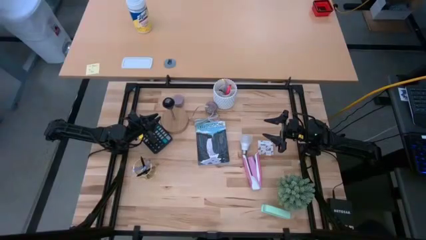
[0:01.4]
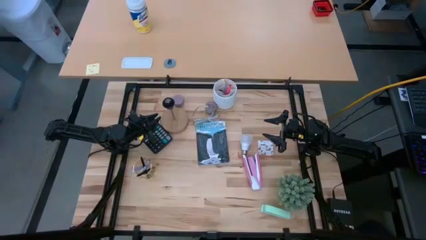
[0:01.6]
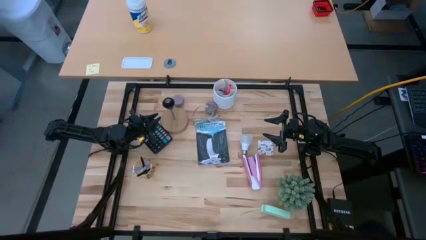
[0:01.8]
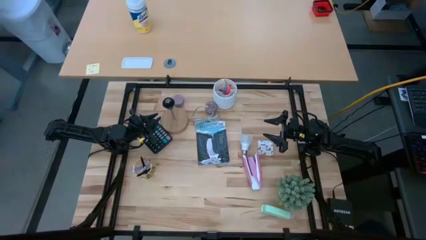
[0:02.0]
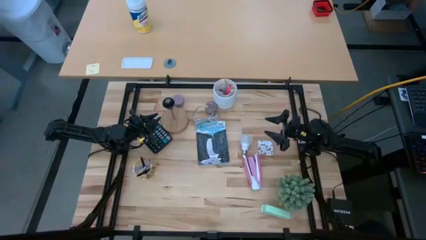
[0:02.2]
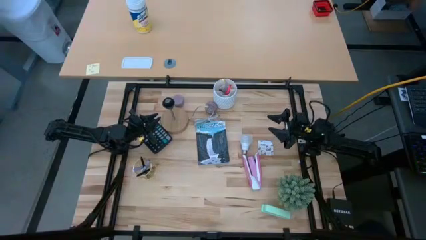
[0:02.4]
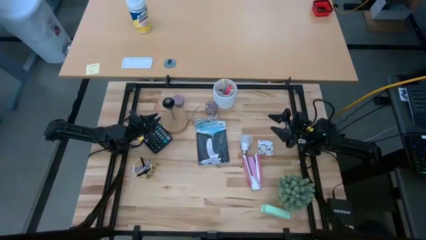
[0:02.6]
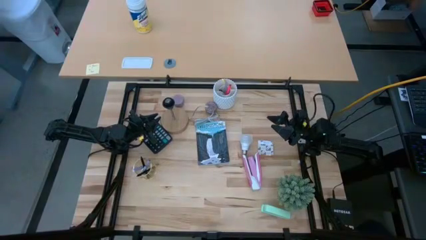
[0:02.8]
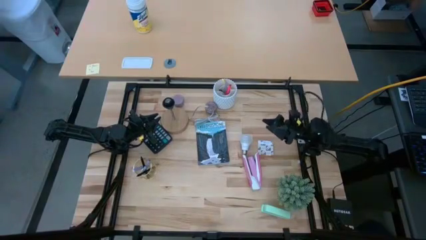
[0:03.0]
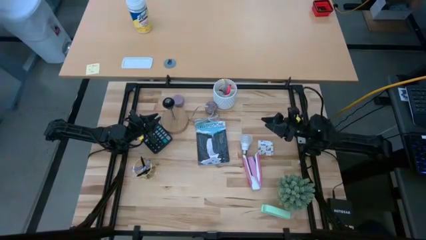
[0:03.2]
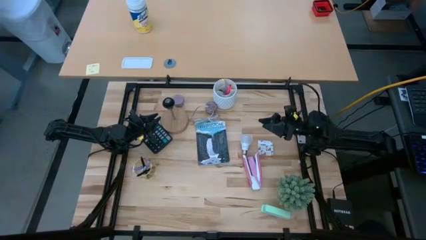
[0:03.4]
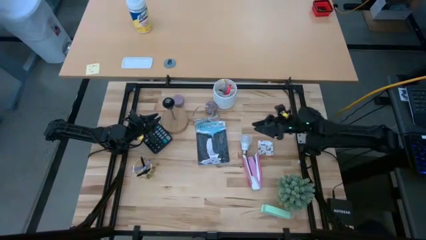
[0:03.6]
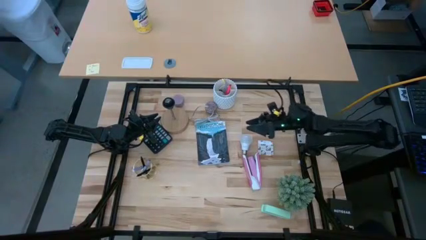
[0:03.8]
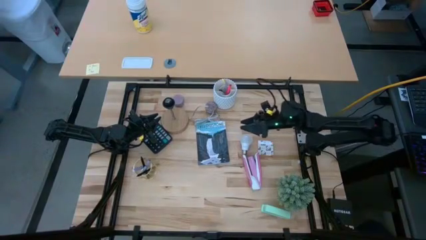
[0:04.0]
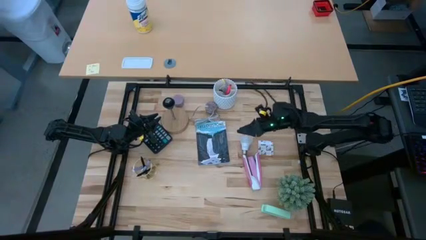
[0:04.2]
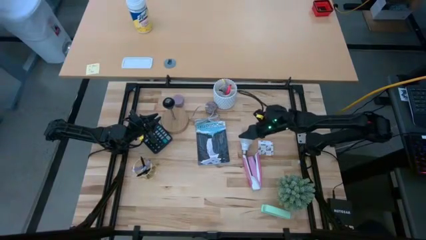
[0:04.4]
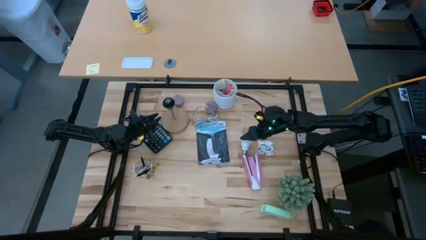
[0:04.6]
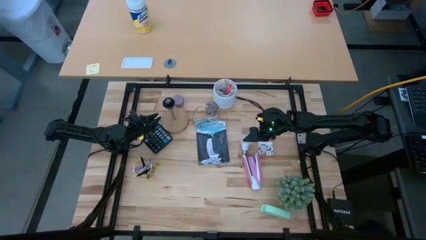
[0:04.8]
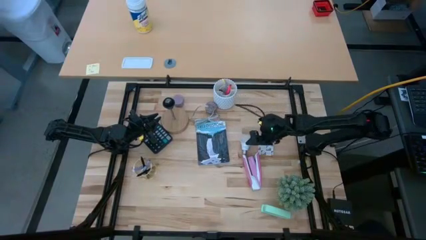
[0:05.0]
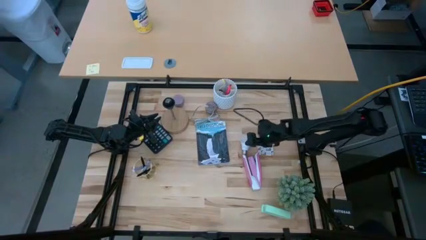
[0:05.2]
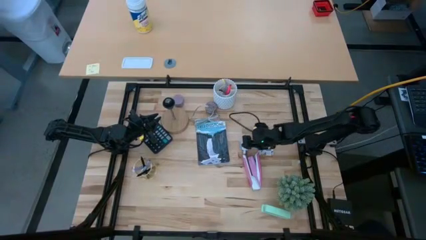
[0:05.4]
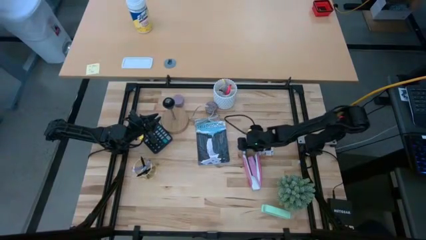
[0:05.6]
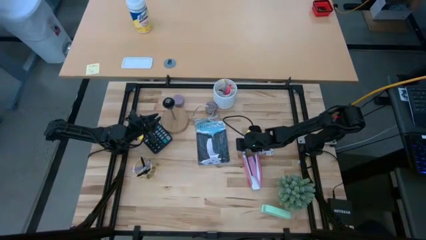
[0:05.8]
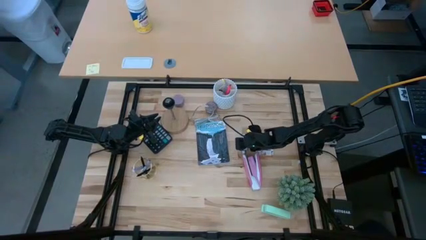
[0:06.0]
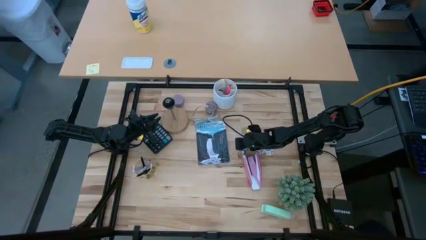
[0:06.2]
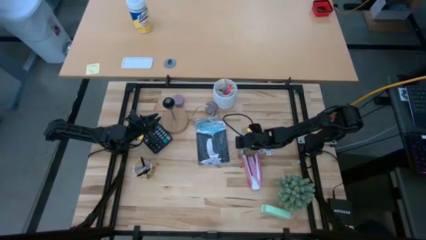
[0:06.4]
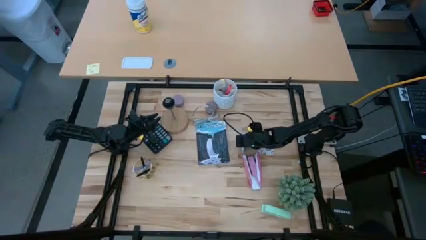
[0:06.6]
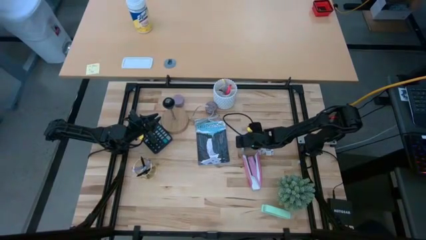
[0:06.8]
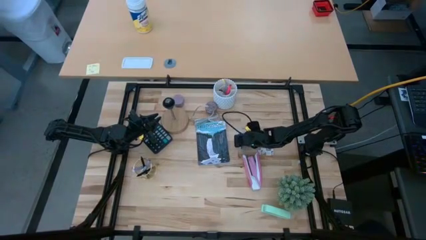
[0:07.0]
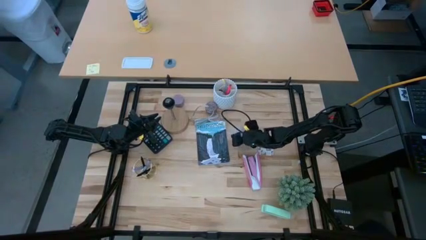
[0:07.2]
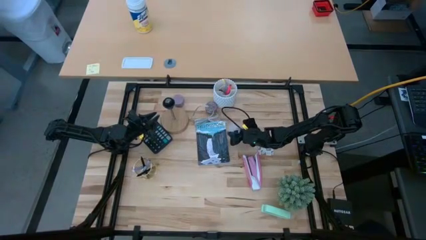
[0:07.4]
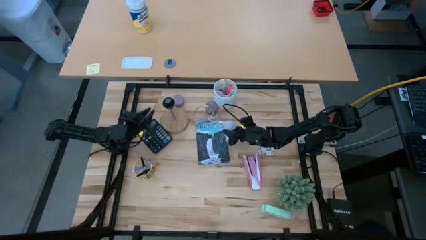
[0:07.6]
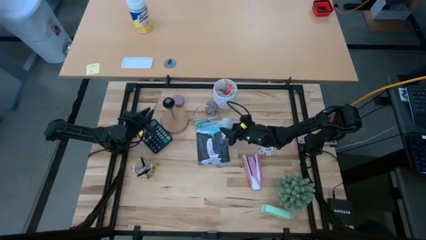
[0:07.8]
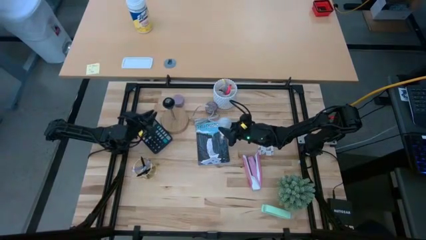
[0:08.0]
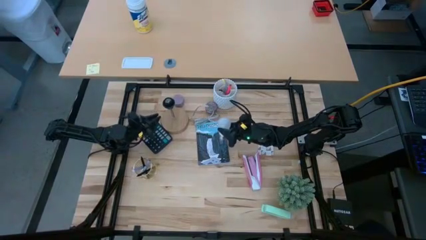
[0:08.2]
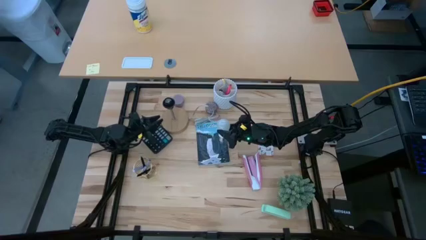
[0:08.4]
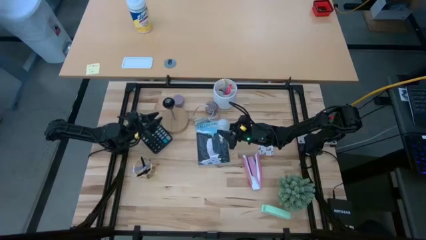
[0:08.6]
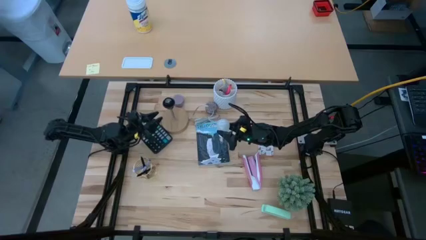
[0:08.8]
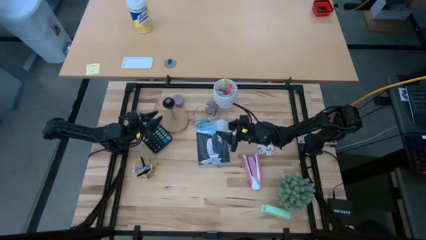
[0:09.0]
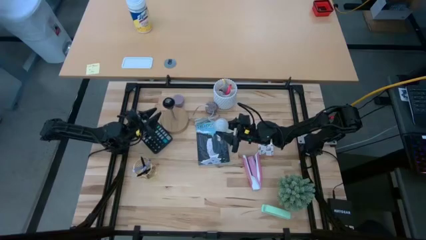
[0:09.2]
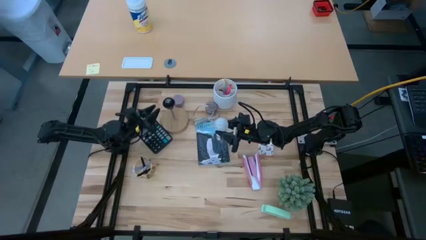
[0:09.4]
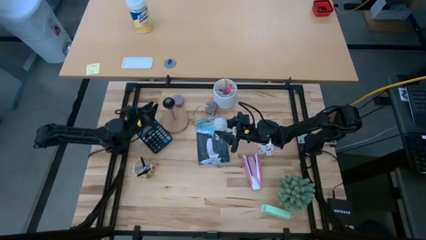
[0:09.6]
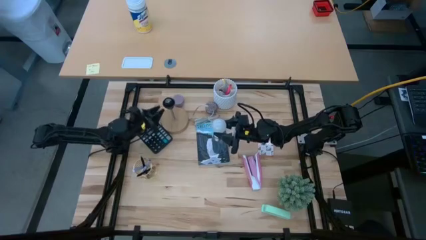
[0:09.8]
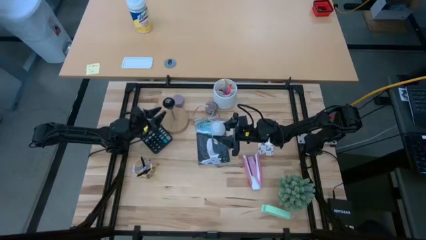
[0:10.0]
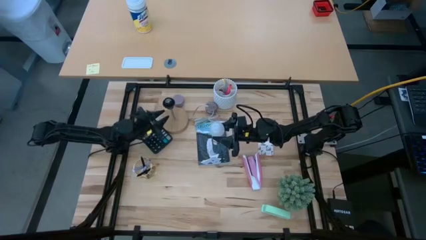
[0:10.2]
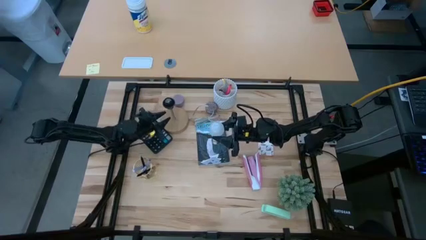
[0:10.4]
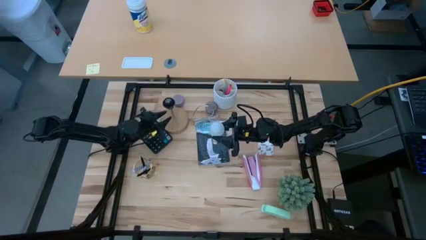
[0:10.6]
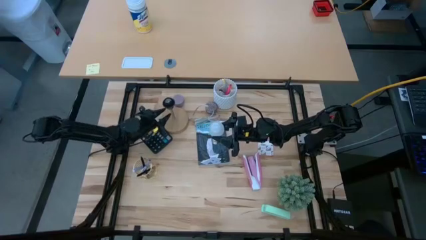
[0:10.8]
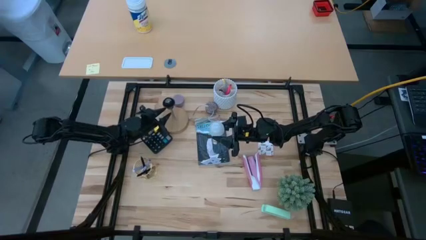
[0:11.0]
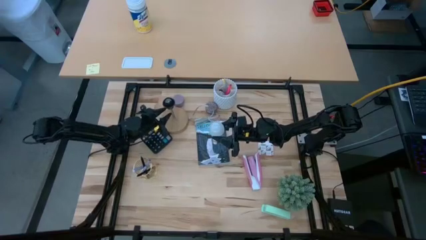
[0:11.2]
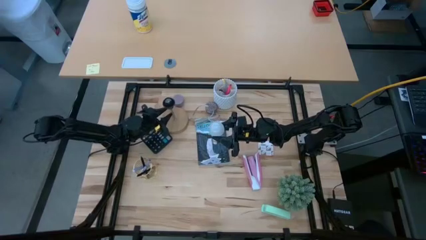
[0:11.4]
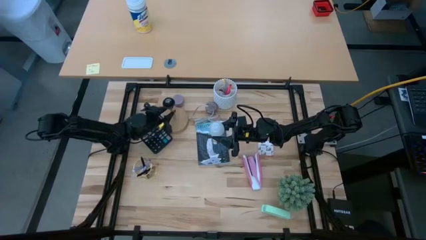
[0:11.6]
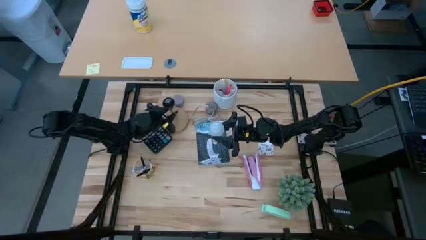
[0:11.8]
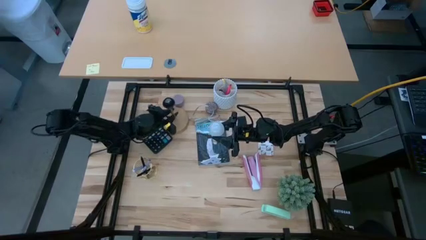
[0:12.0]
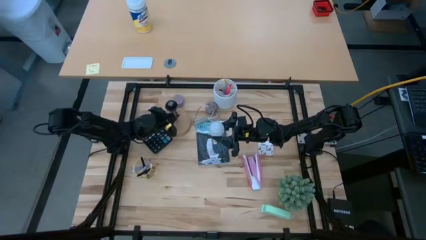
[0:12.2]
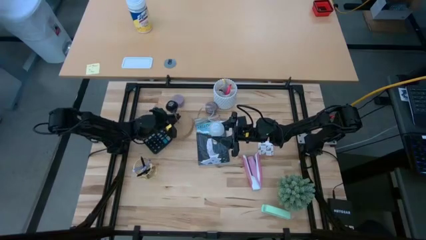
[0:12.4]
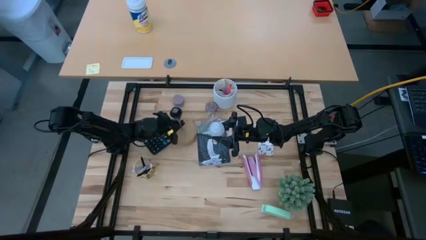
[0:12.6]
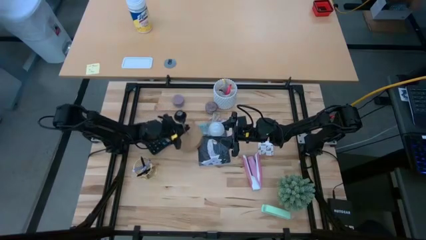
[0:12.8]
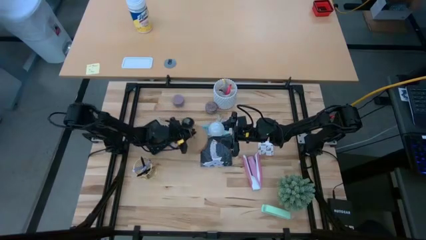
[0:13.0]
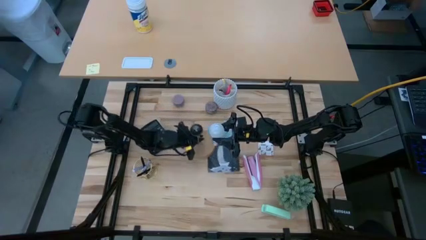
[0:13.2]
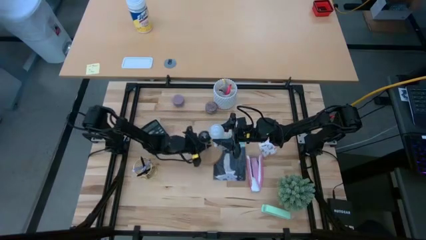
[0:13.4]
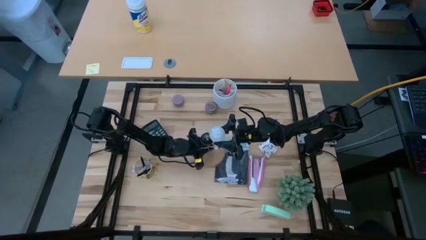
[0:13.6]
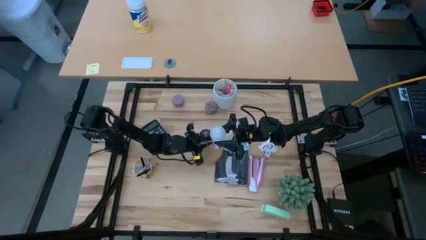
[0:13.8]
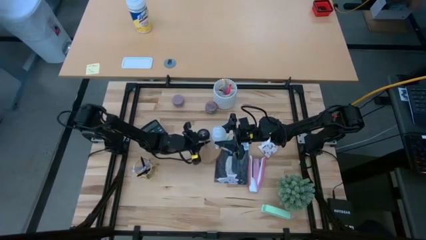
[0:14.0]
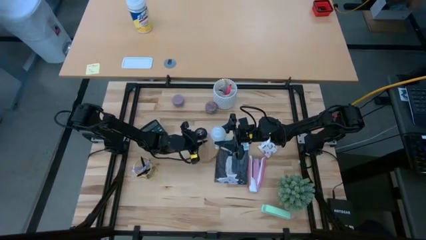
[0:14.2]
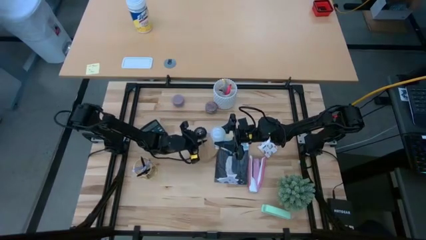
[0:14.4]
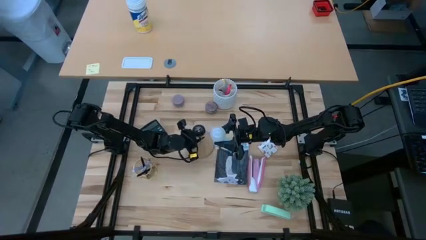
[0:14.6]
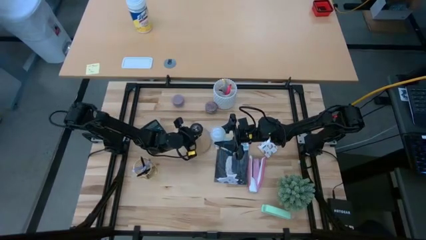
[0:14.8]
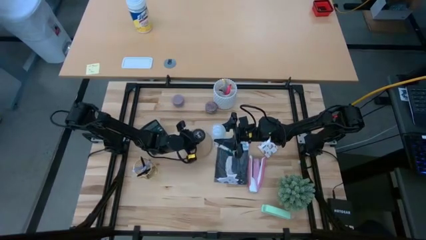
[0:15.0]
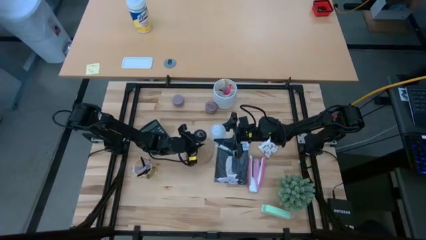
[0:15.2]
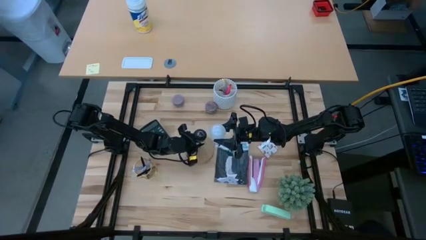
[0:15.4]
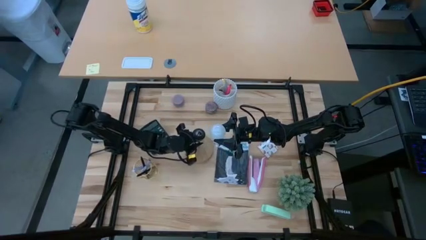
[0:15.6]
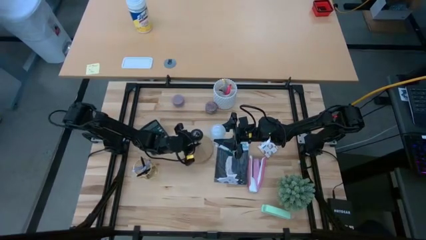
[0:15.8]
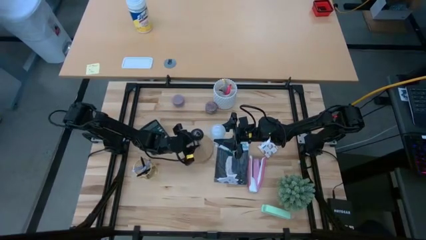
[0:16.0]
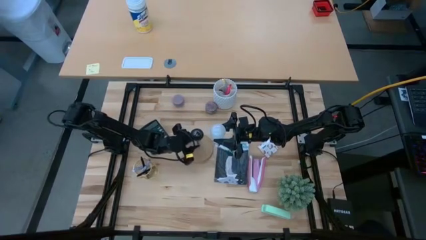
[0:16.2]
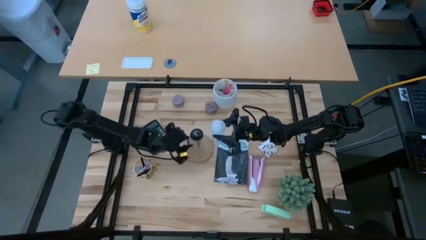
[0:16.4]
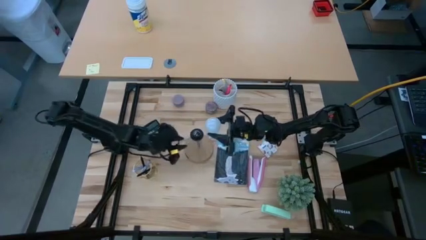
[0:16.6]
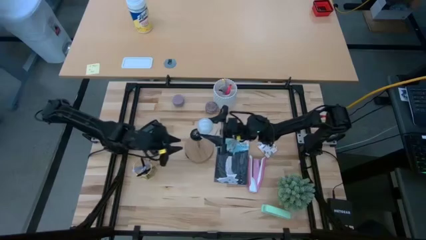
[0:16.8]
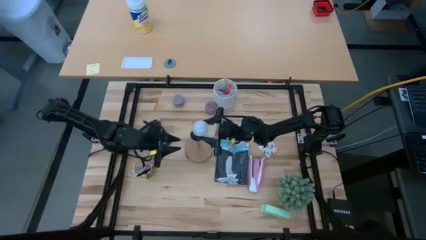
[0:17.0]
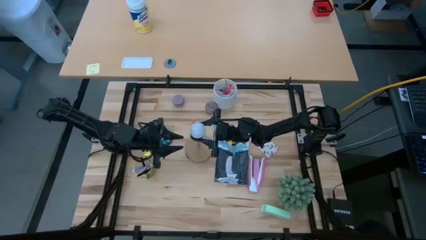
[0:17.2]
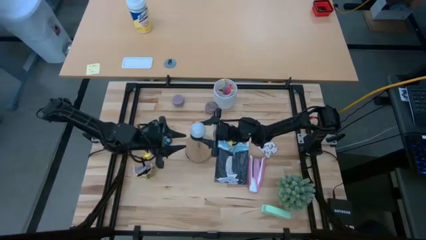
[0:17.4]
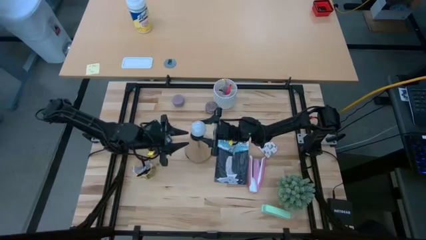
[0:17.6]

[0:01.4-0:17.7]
Task: Screw lightbulb
Insert the lightbulb into the lamp
